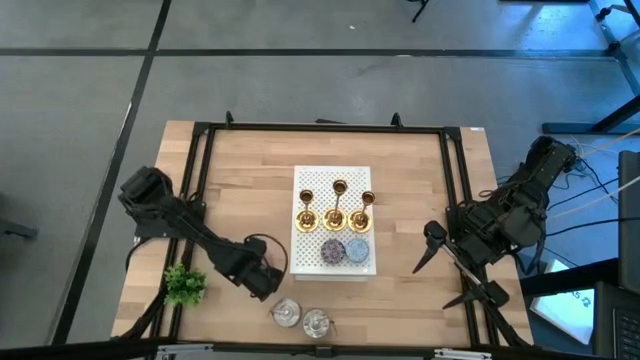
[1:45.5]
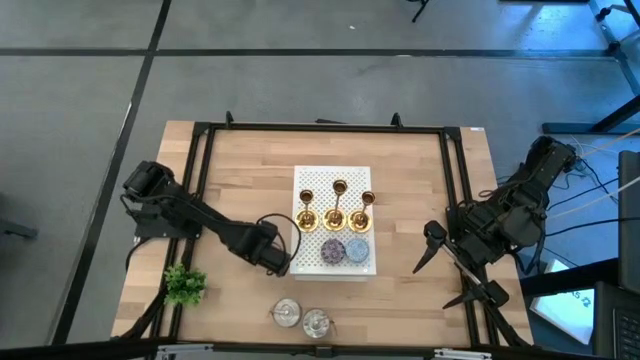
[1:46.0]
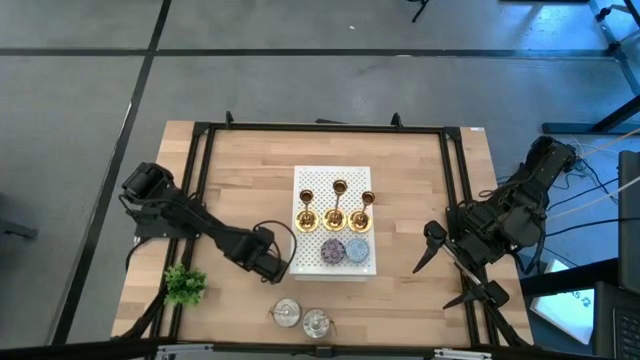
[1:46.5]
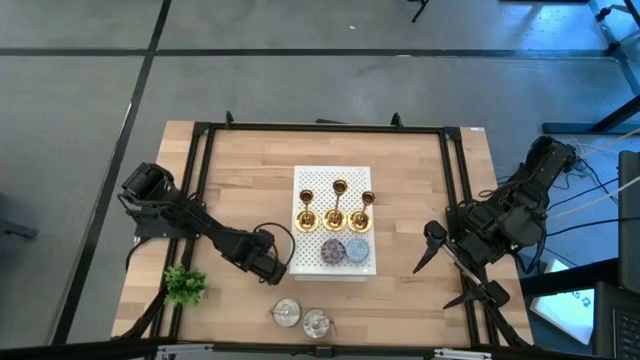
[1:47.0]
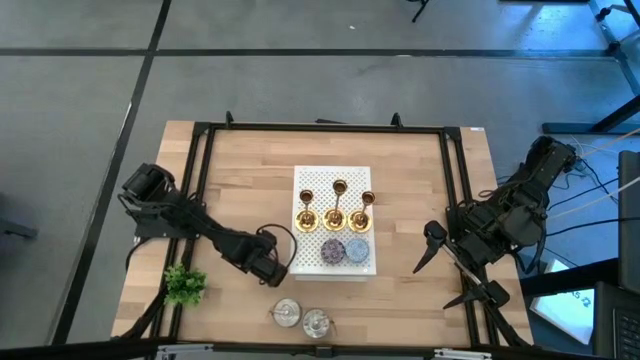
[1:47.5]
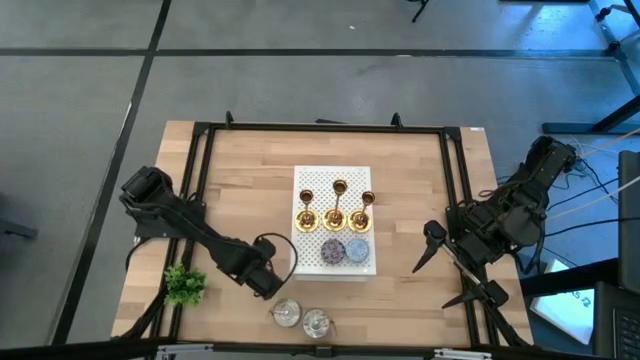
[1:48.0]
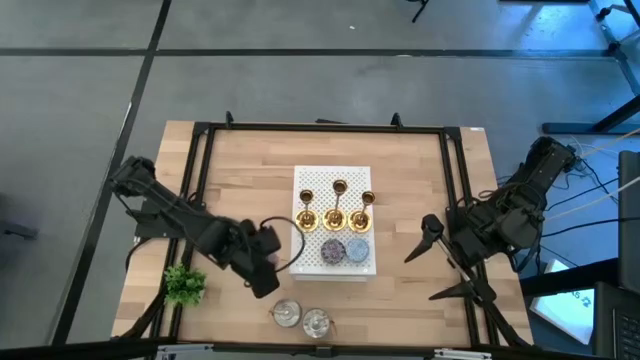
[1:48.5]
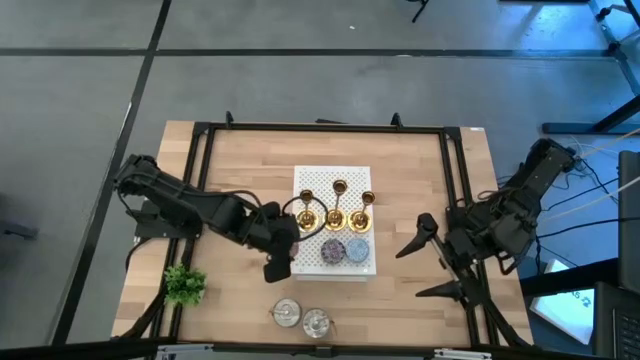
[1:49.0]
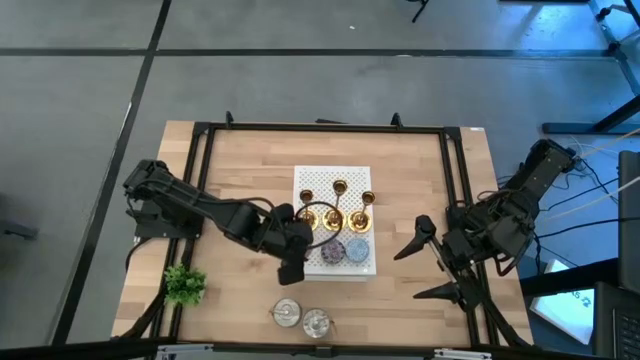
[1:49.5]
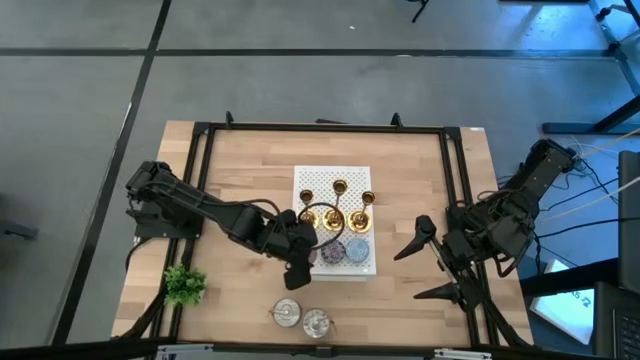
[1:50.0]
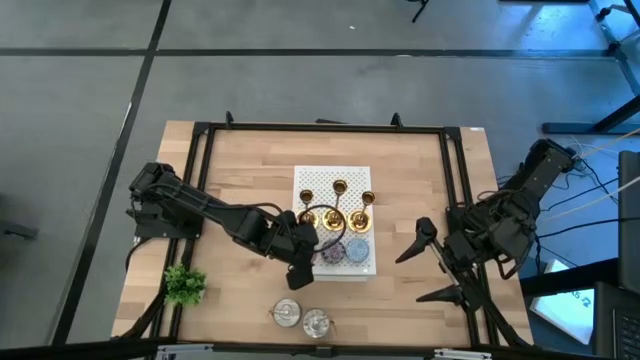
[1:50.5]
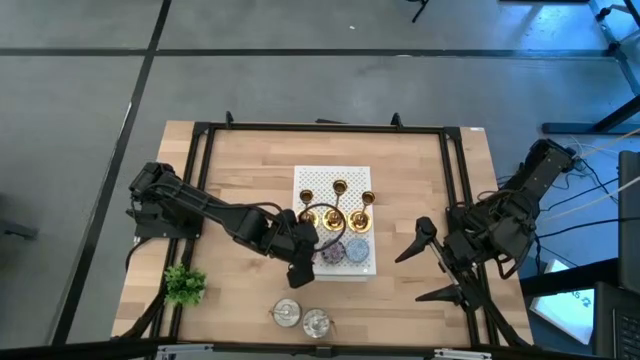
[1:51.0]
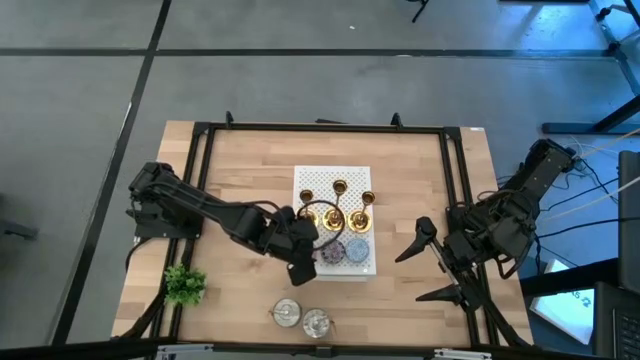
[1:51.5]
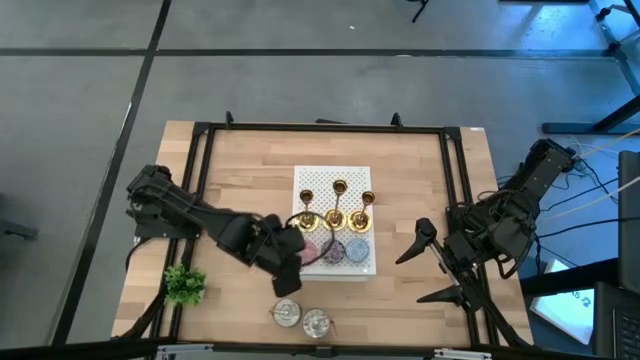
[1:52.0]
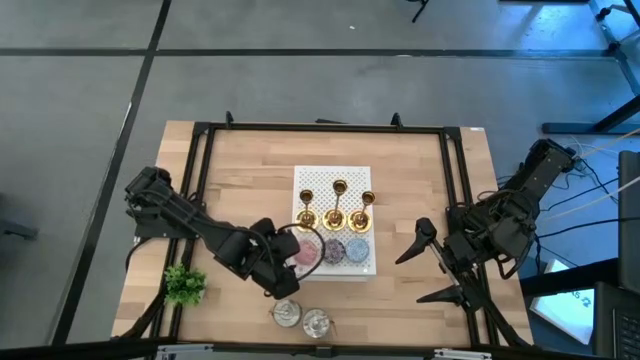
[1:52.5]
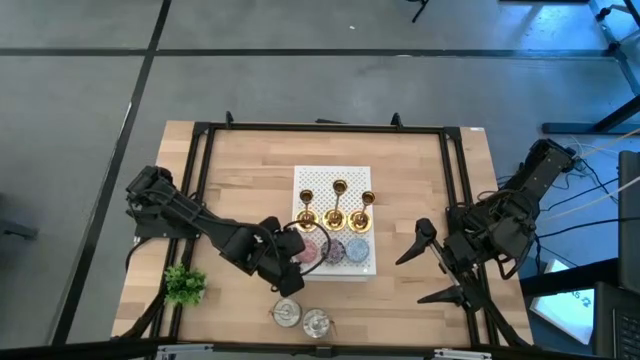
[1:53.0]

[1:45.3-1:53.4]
Task: Pick & Place candle stick holders
Put the pink patterned scented candle on the shelf aligned with the other red and blue patterned scented candles

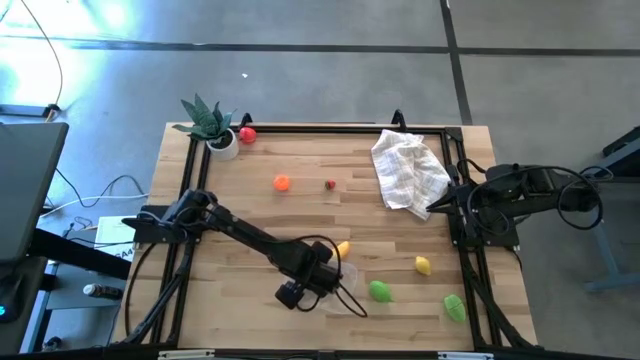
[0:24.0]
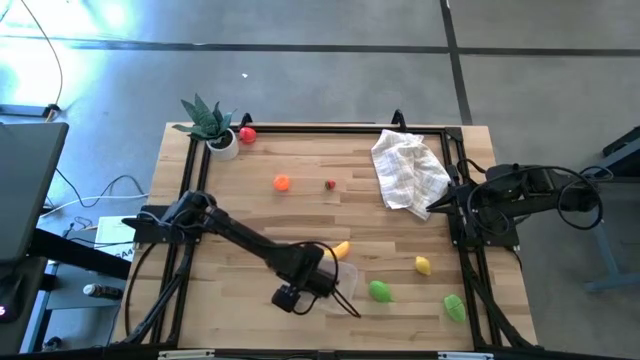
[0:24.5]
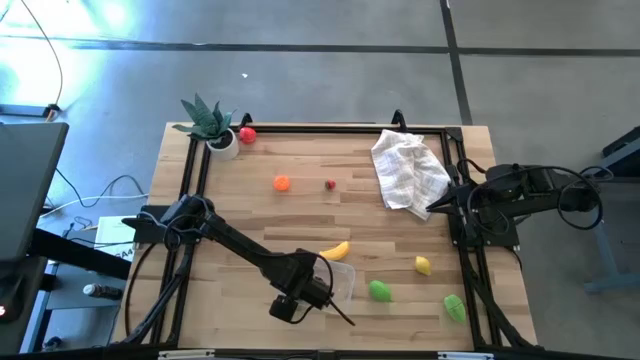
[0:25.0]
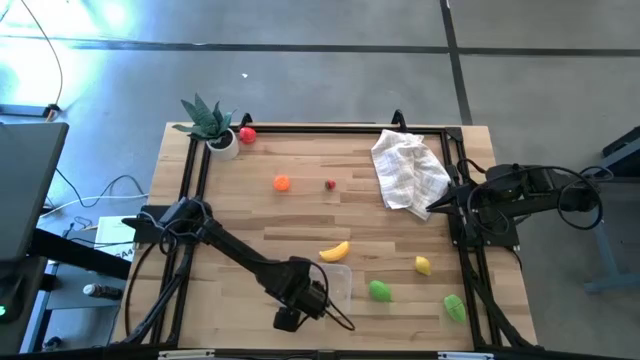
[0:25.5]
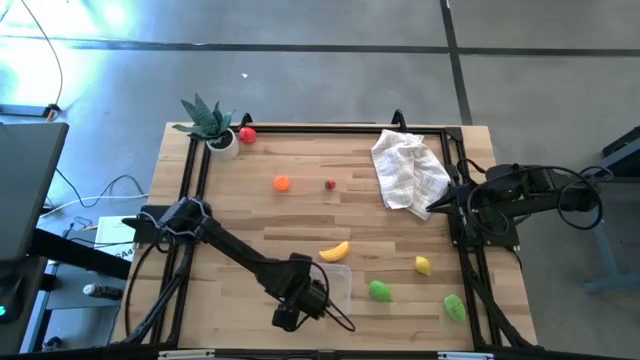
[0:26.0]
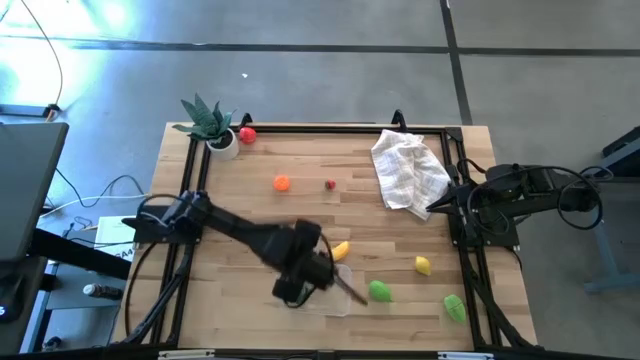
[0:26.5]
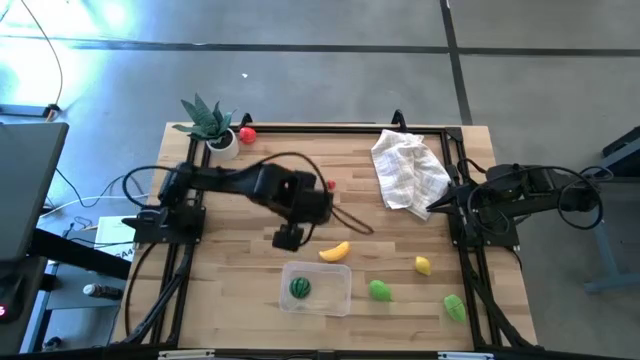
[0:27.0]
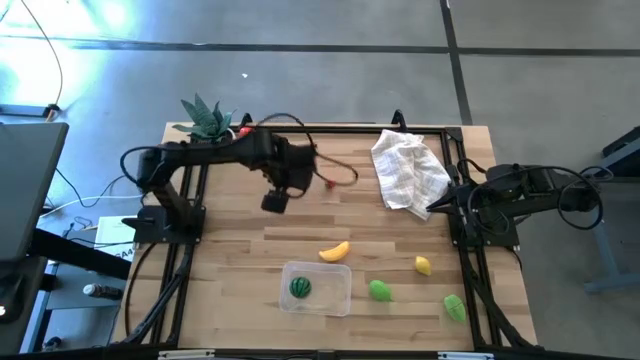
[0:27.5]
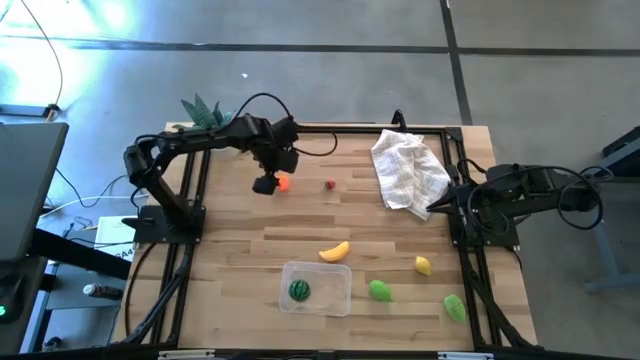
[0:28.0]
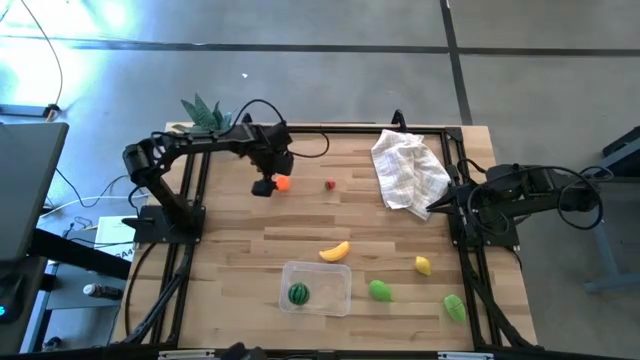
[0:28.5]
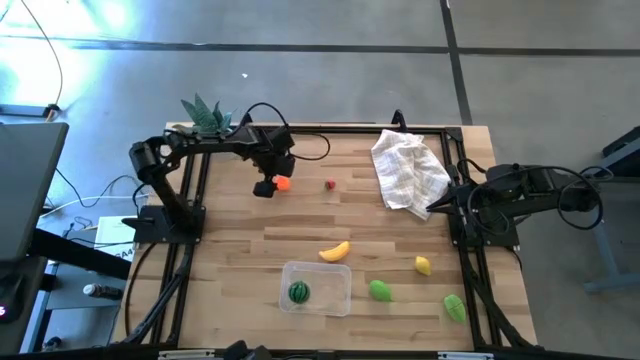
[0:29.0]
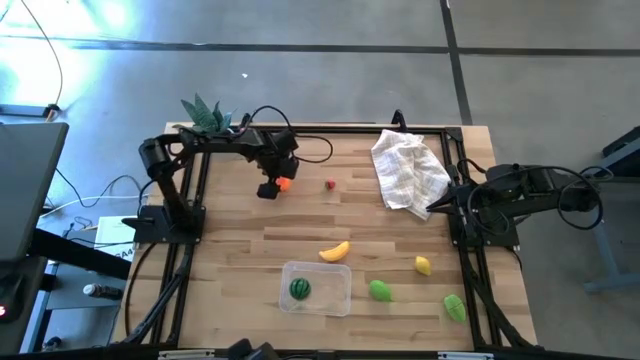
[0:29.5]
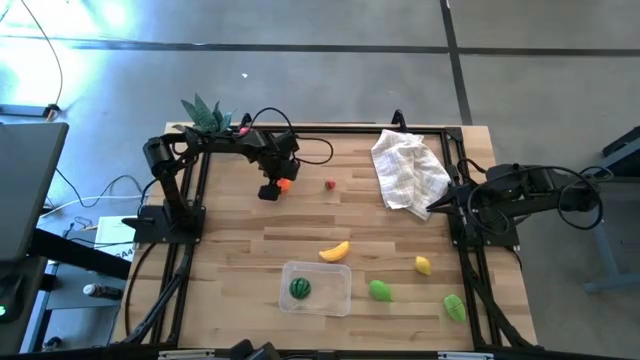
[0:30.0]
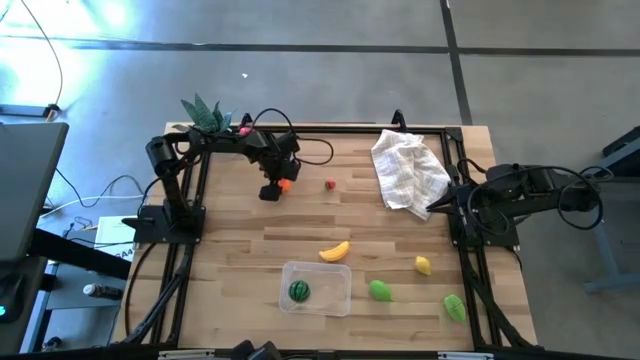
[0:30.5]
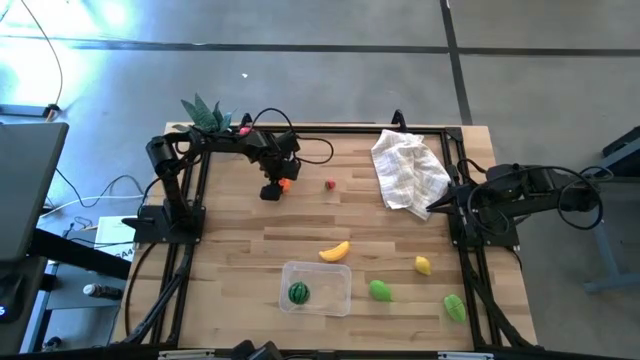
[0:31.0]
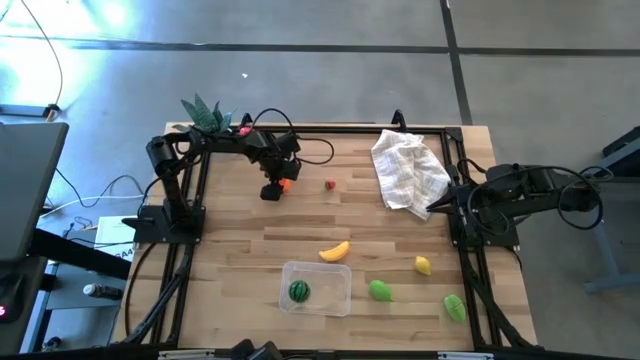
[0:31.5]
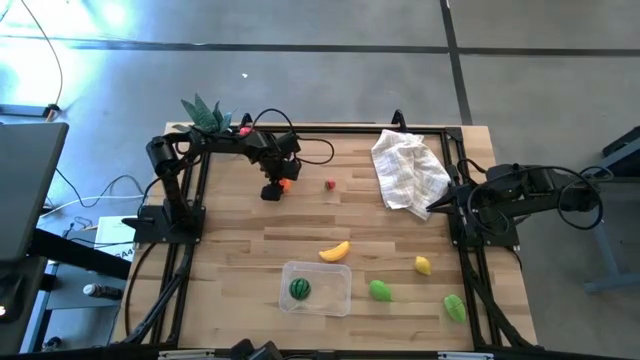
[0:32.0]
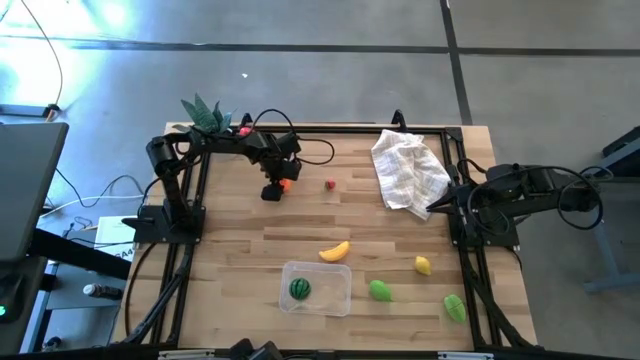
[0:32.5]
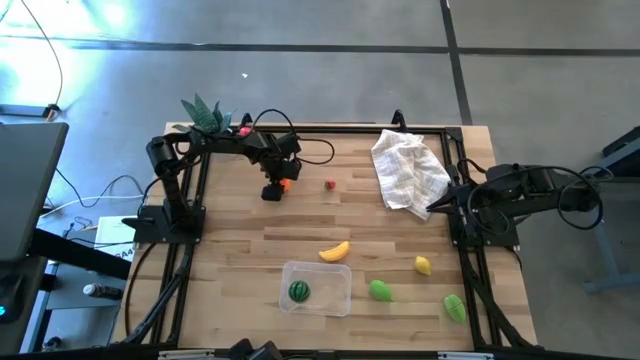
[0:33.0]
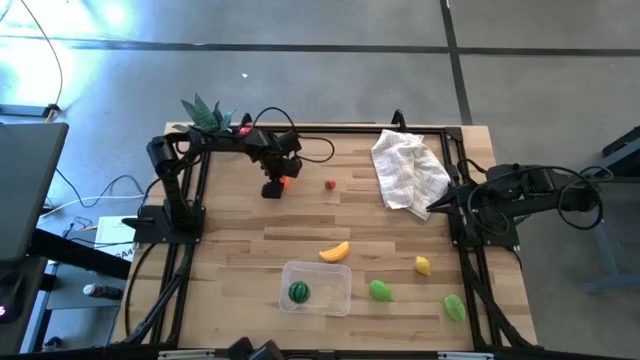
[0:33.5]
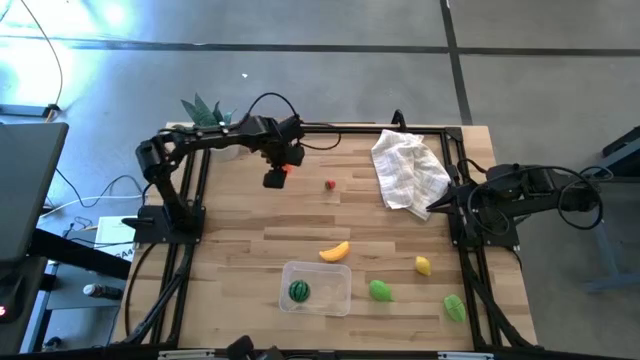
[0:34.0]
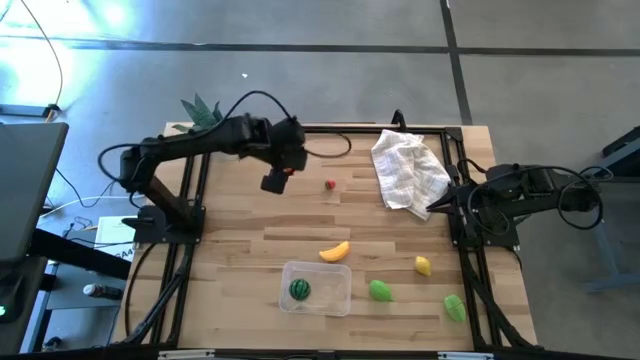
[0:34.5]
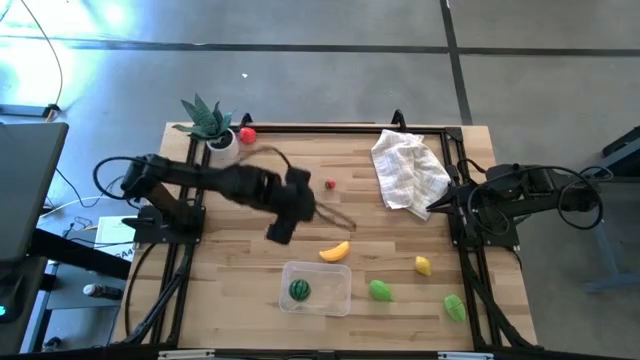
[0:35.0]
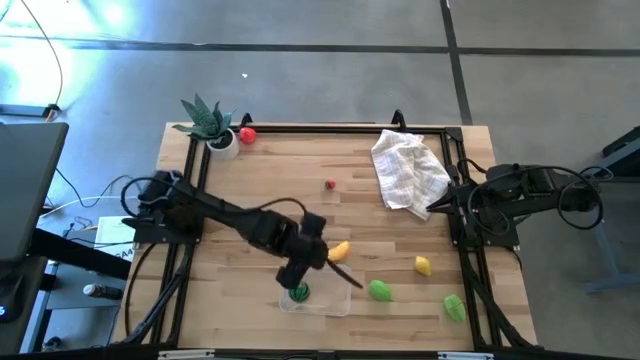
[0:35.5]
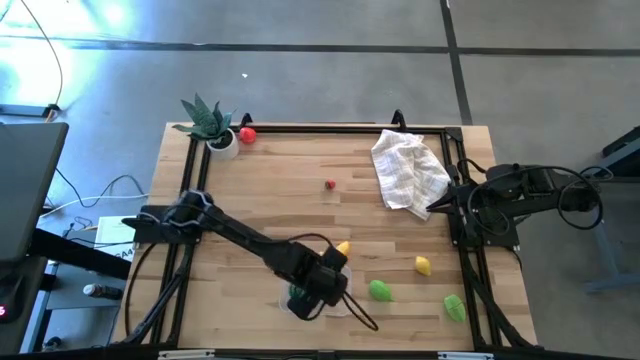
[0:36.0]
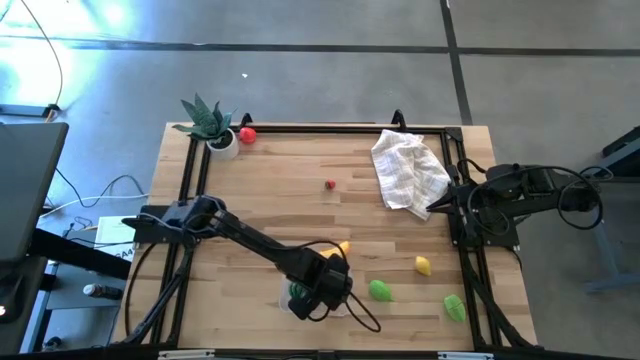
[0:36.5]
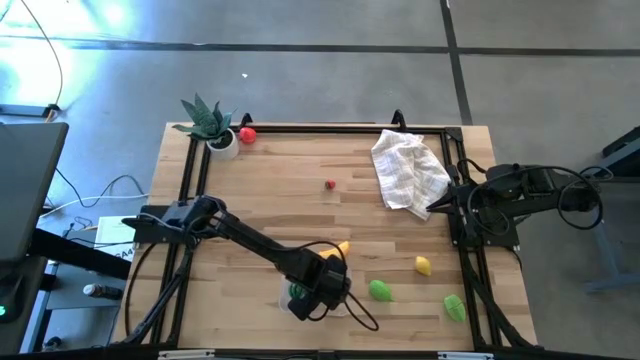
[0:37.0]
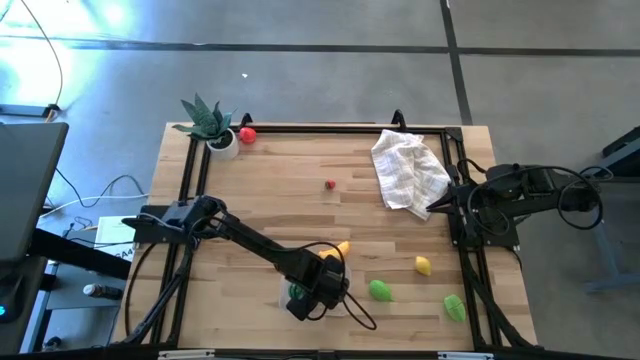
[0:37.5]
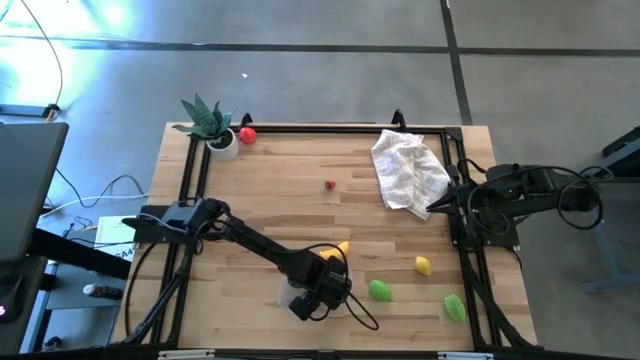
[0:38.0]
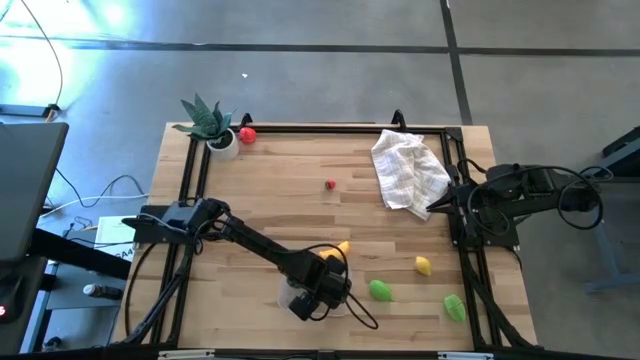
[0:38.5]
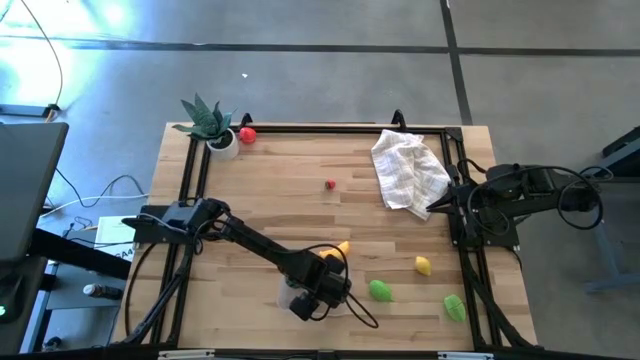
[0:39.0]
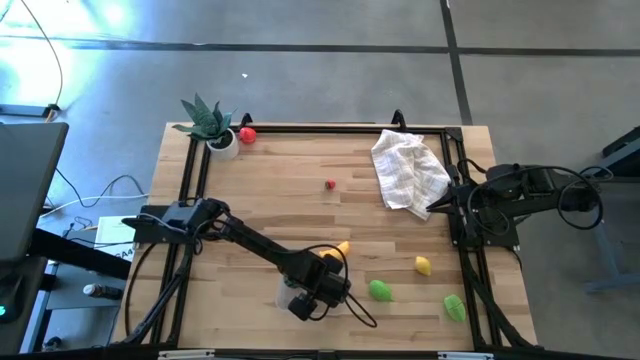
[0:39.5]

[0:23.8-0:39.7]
Task: Pick and placing Produce into tupperware
Put the tangerine into the bin
